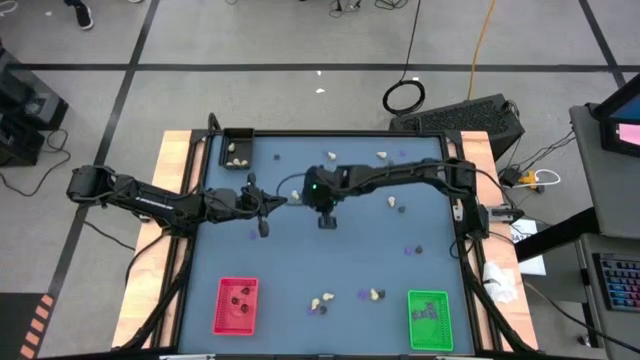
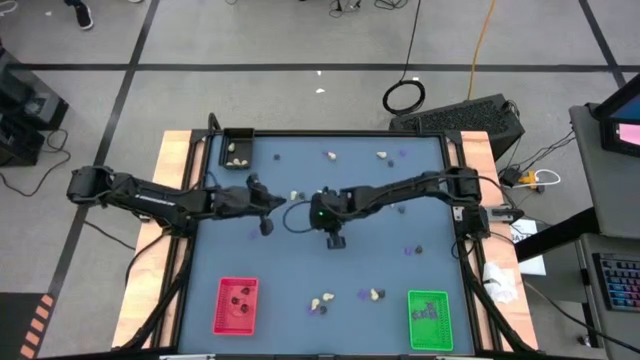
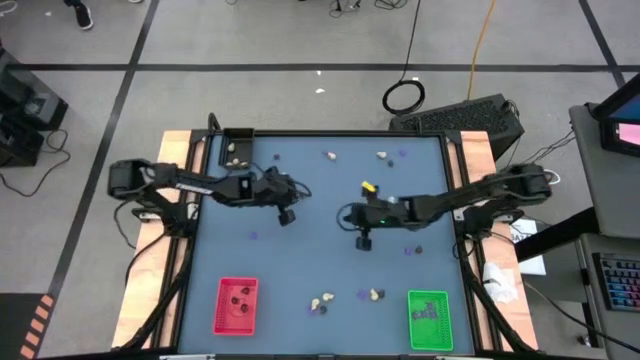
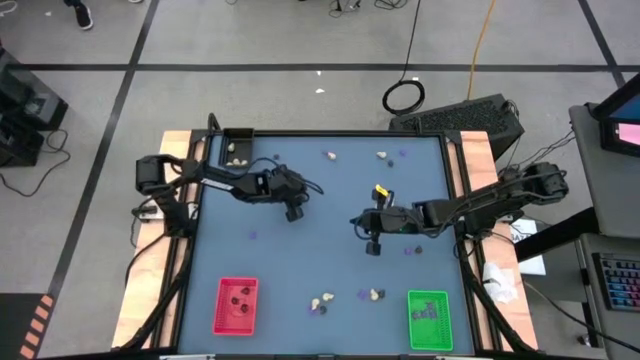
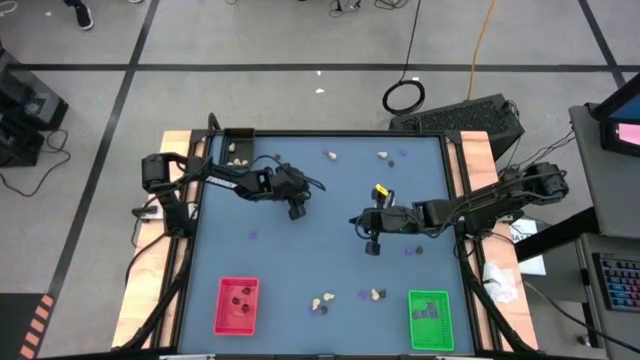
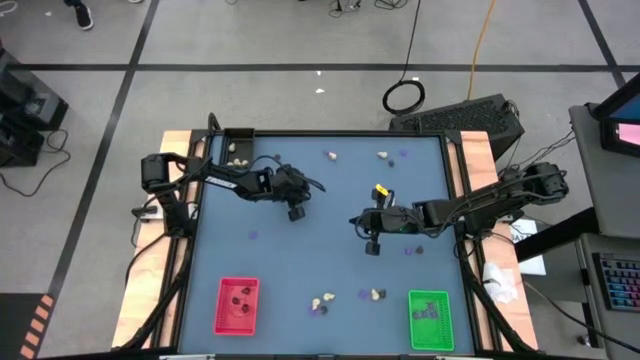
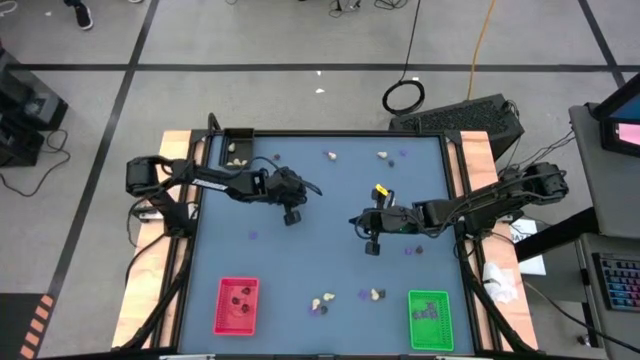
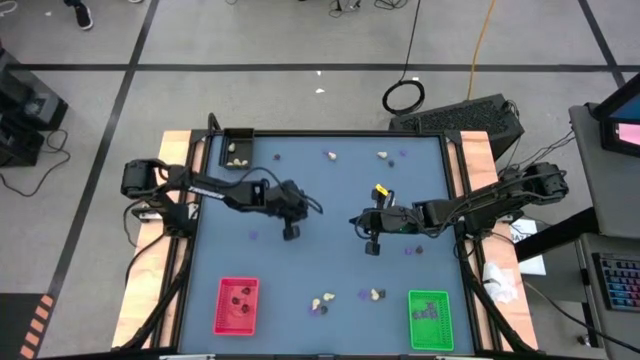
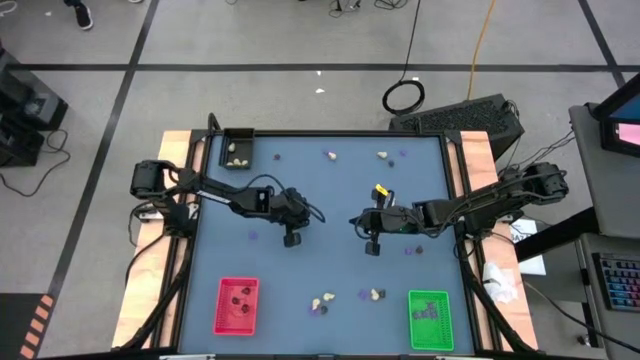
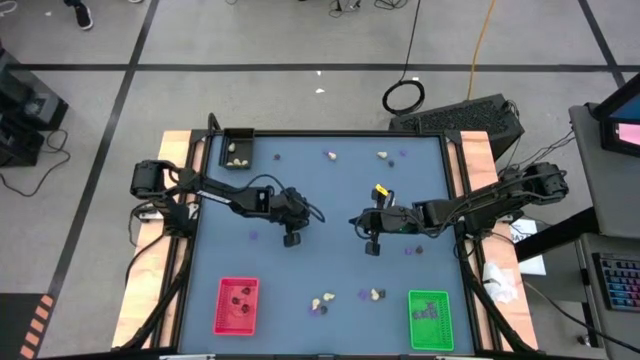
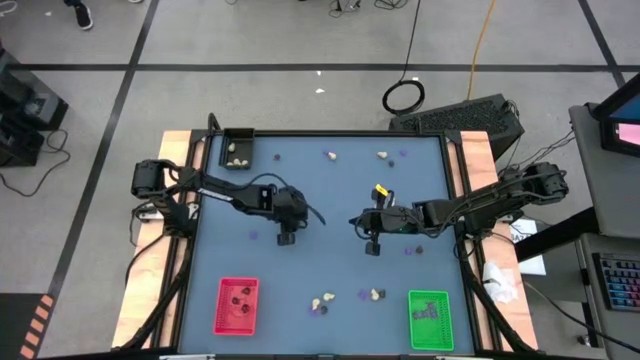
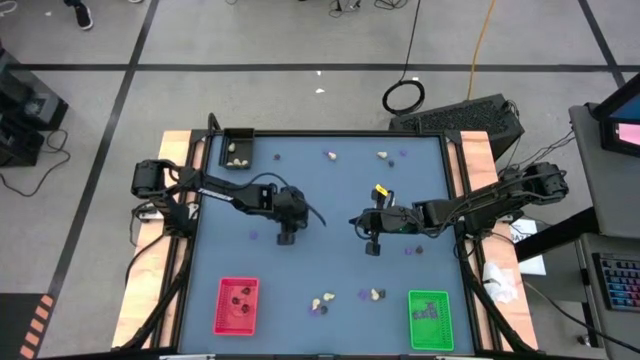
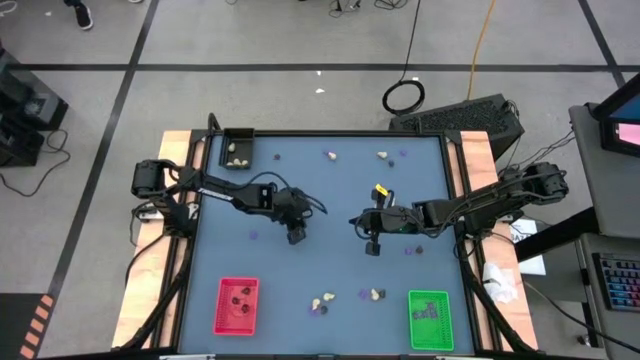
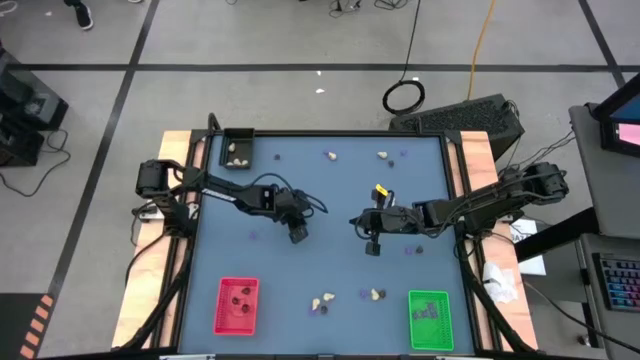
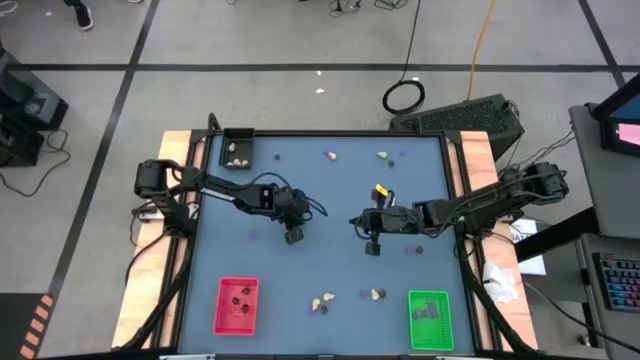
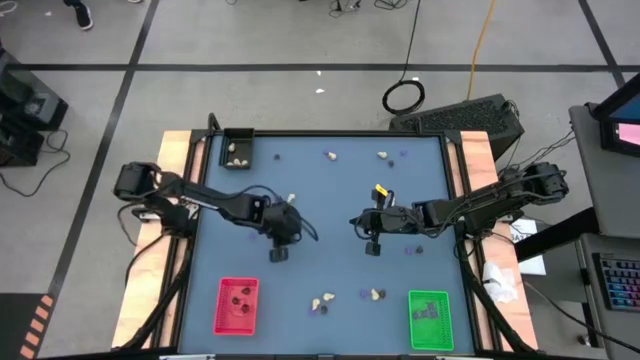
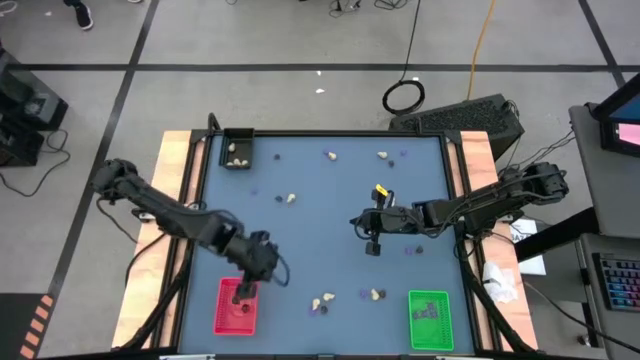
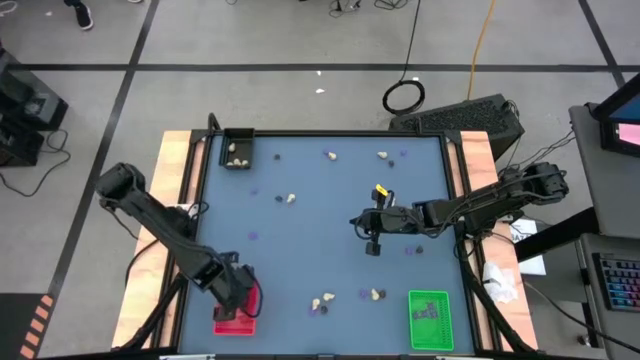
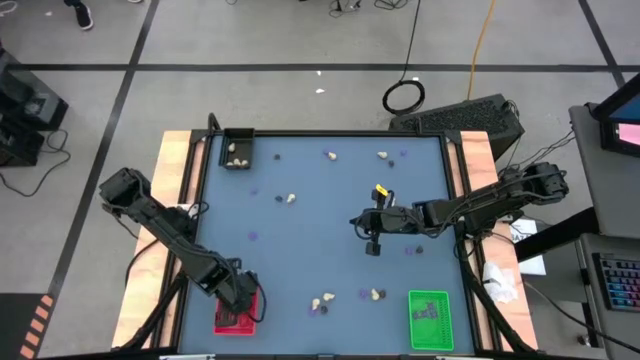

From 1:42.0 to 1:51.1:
Task: Sort Halloween decoration
Put the black skull toy into the red bin

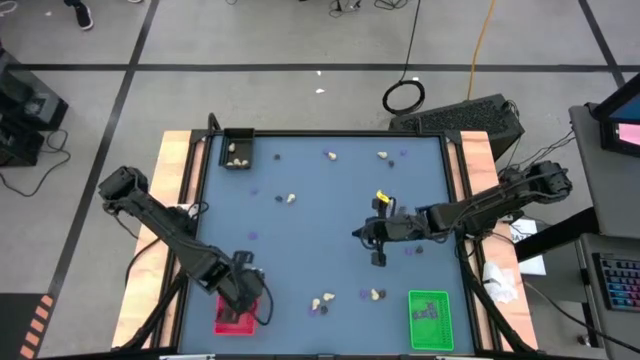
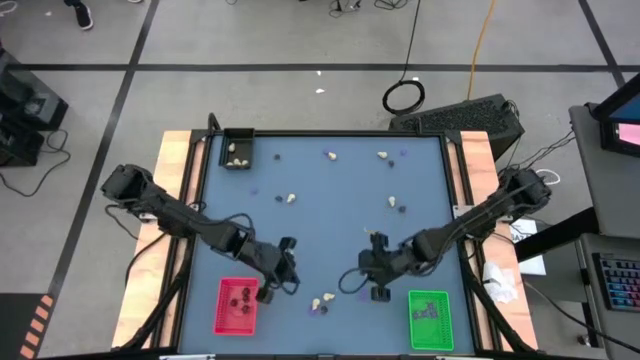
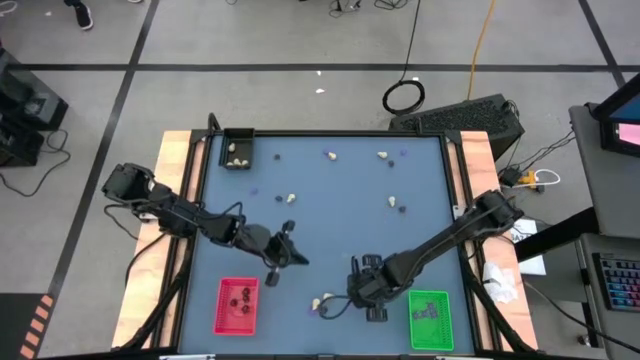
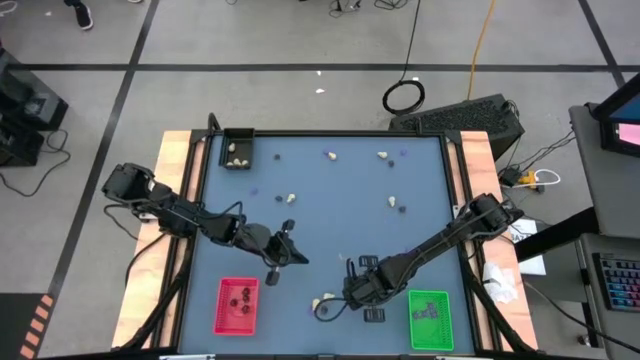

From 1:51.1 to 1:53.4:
Put the violet spider toy into the green bin

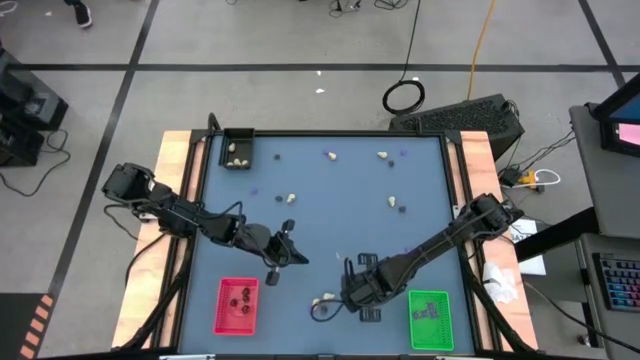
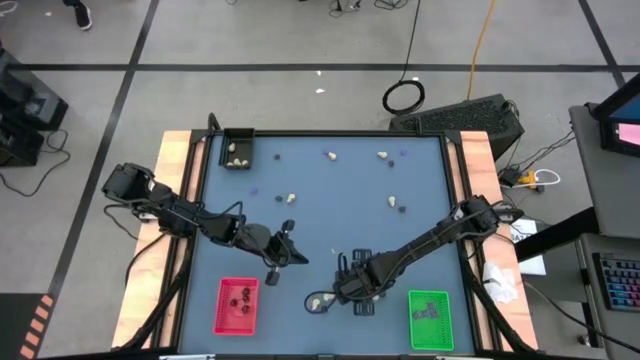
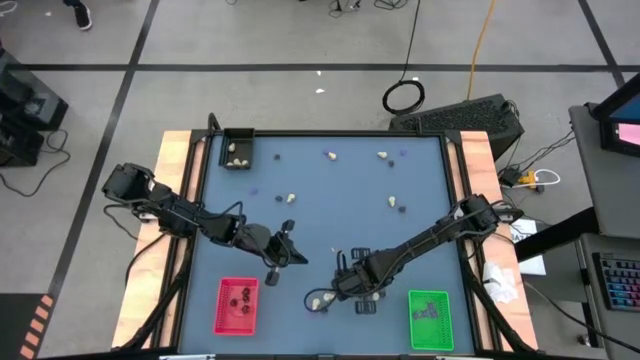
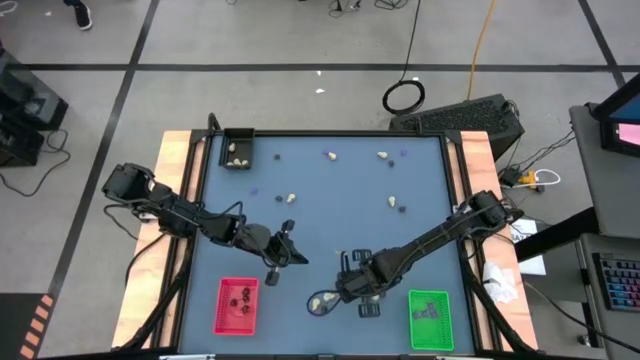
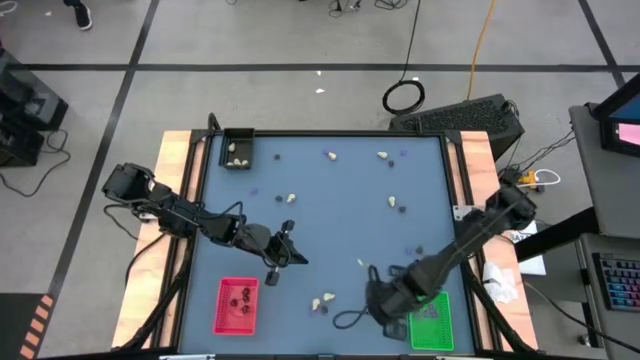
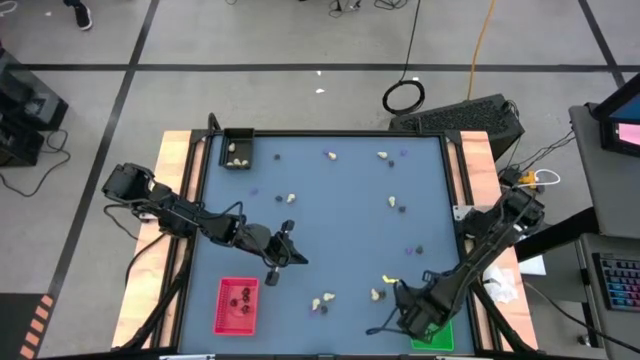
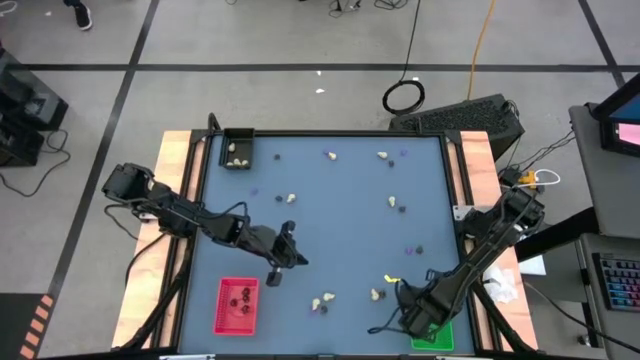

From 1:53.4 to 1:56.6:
Put the violet spider toy into the green bin

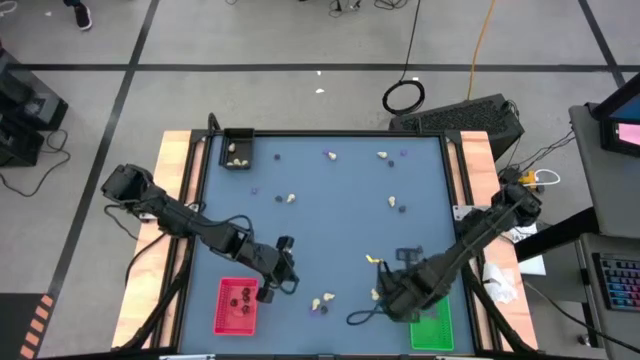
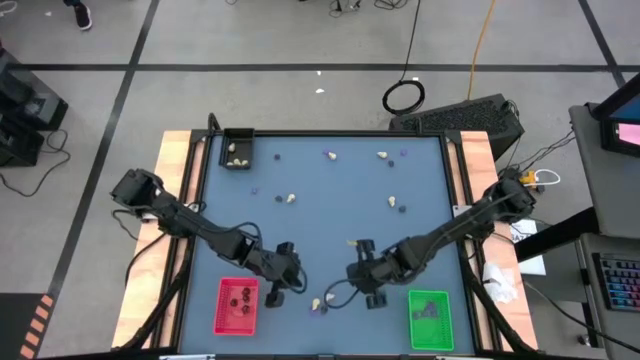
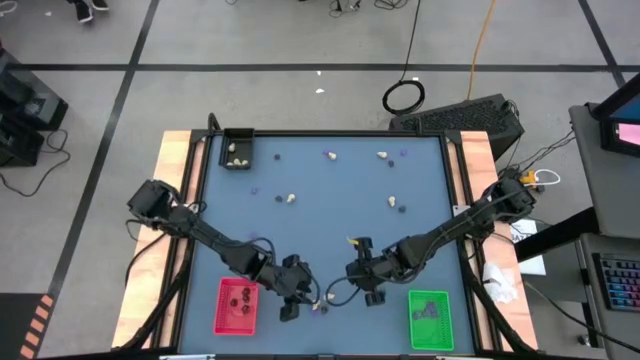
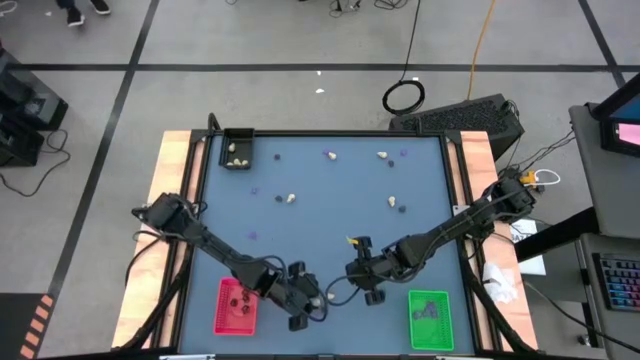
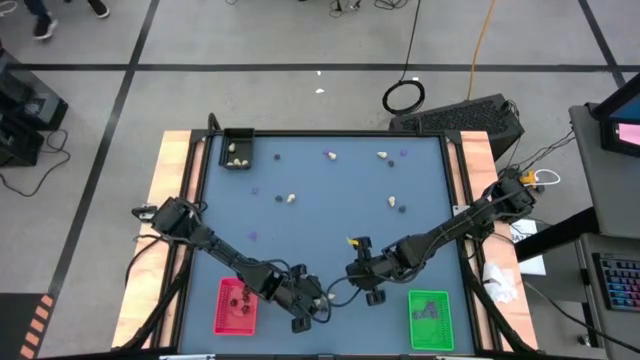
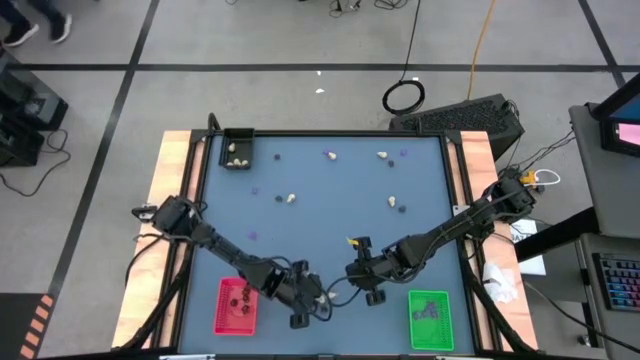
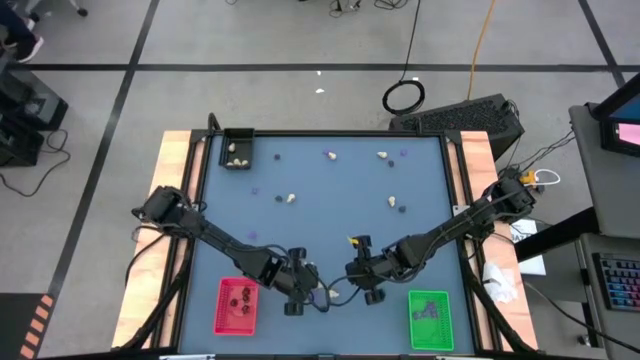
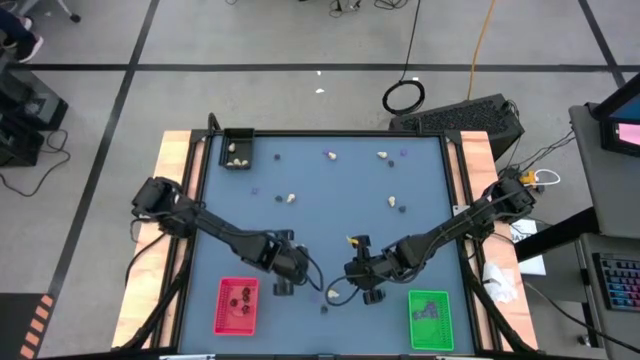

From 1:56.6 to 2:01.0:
Put the white skull toy into the black bin

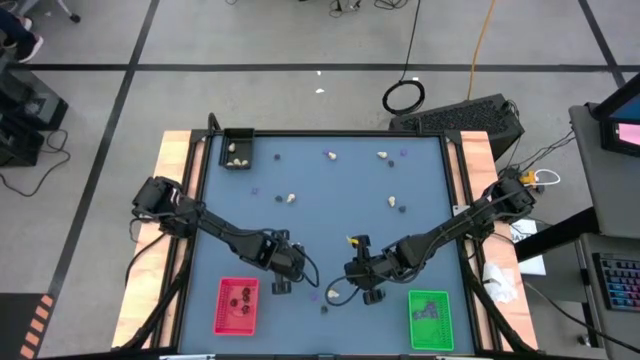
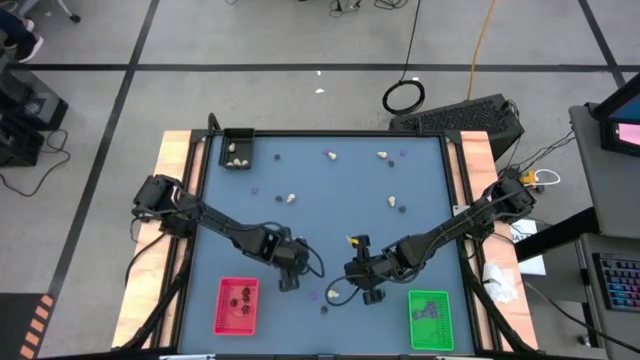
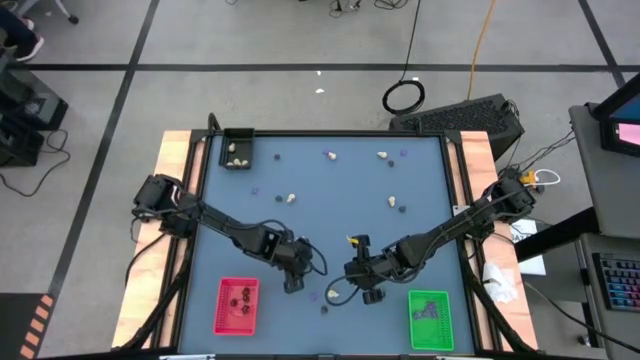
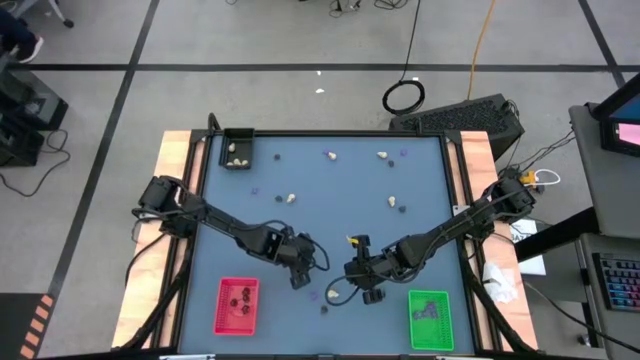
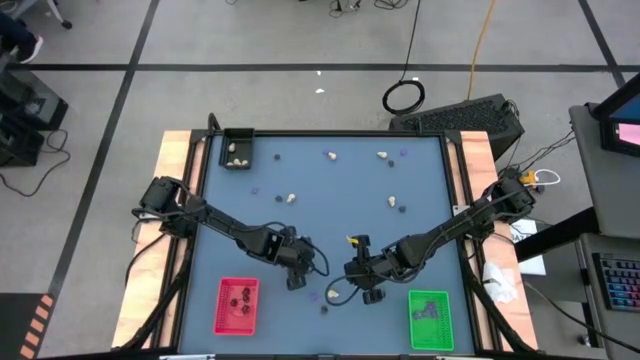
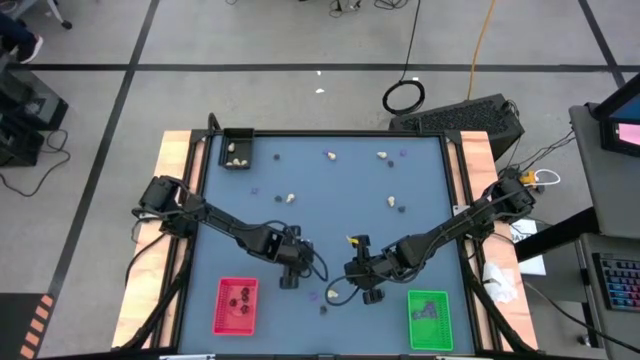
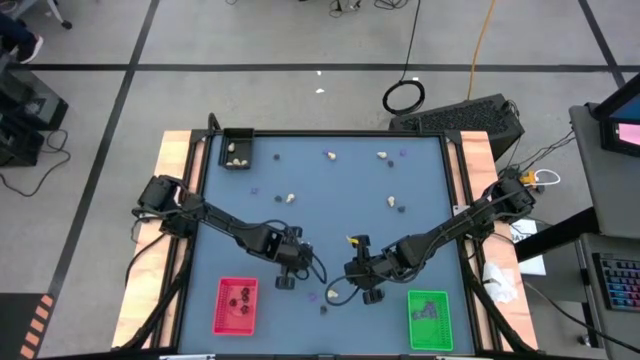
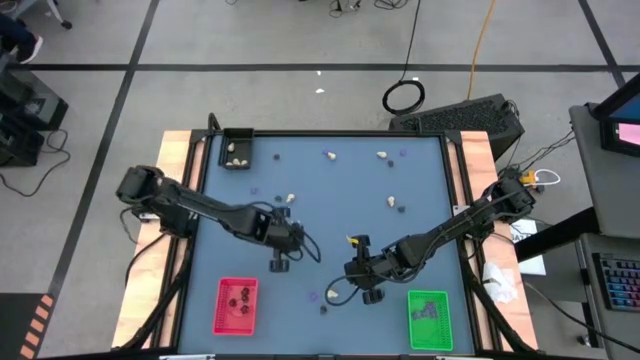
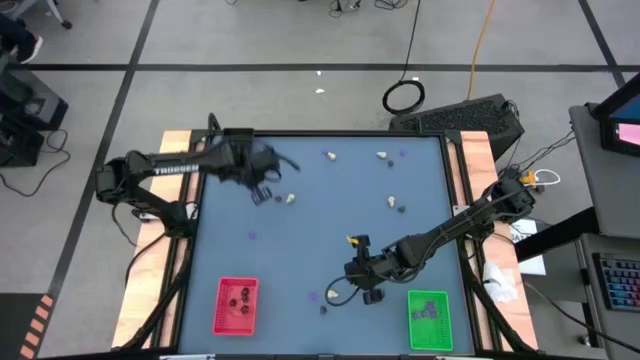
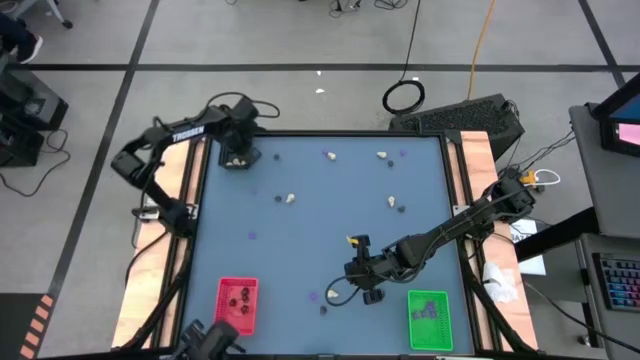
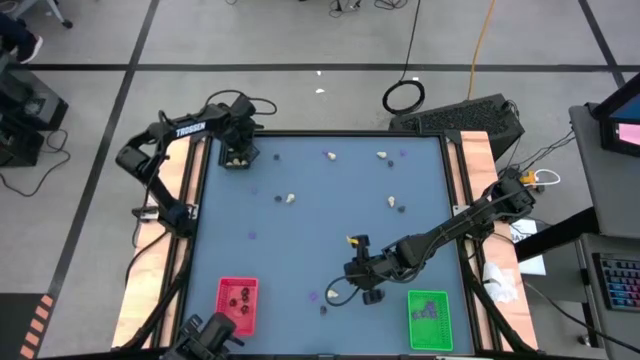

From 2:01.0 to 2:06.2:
Put the white skull toy into the black bin
